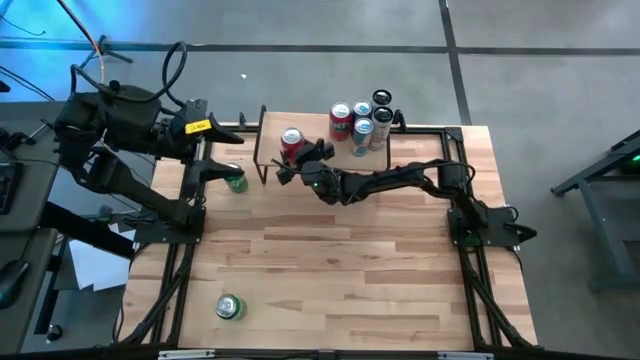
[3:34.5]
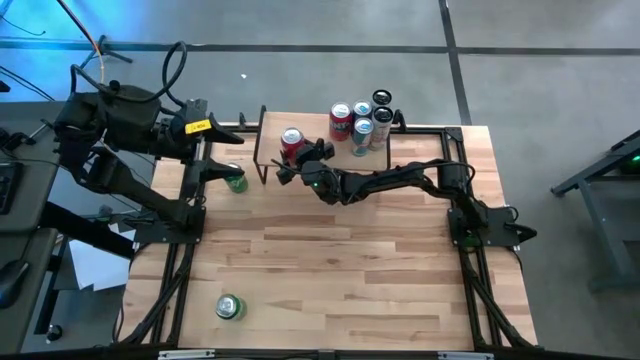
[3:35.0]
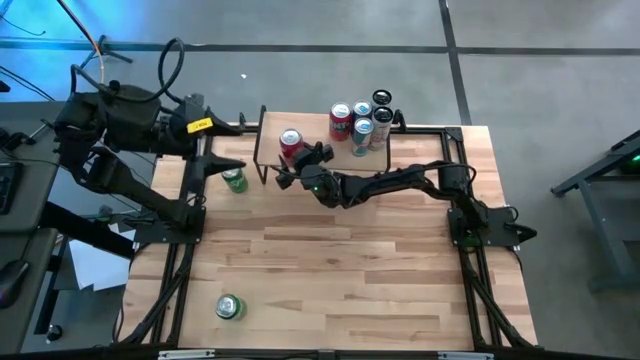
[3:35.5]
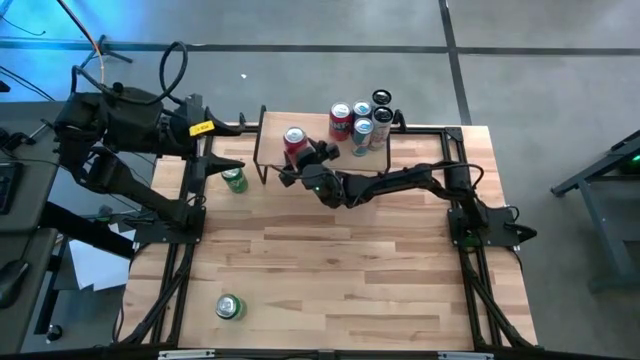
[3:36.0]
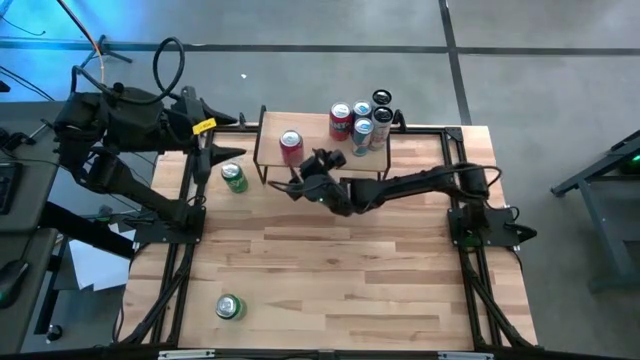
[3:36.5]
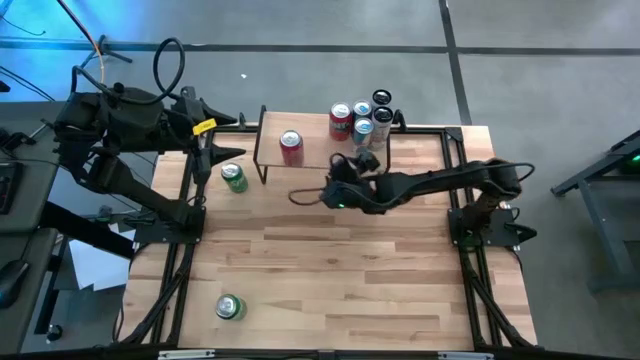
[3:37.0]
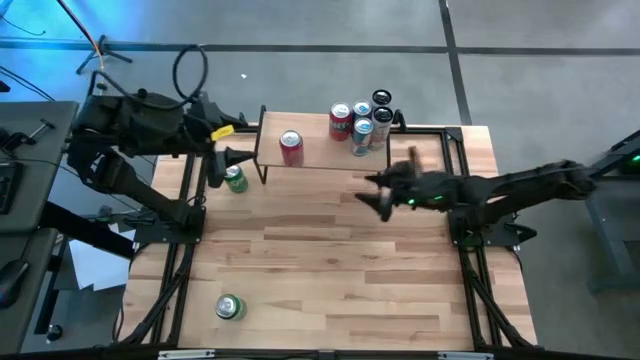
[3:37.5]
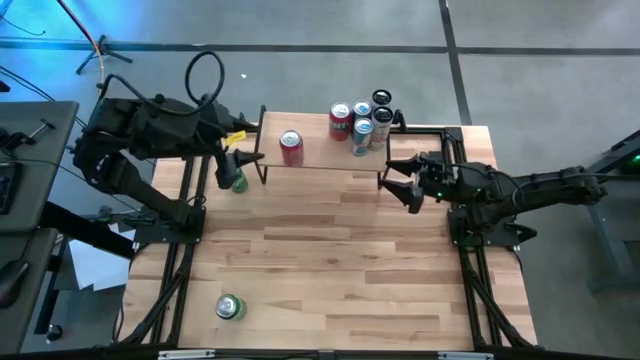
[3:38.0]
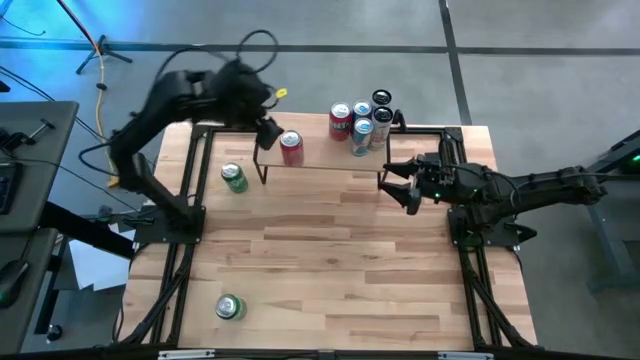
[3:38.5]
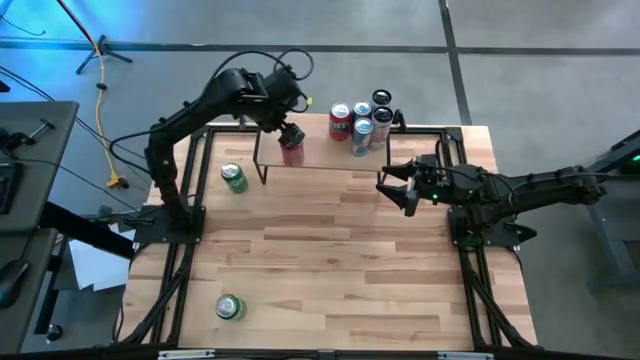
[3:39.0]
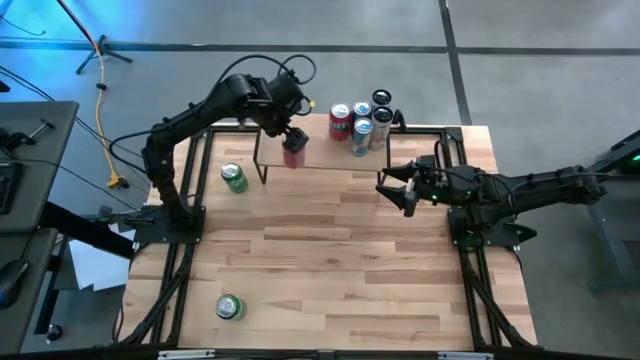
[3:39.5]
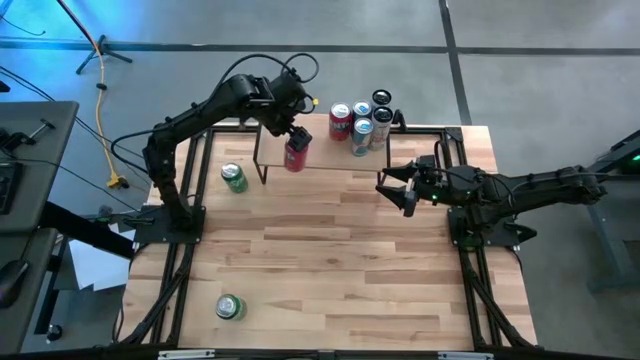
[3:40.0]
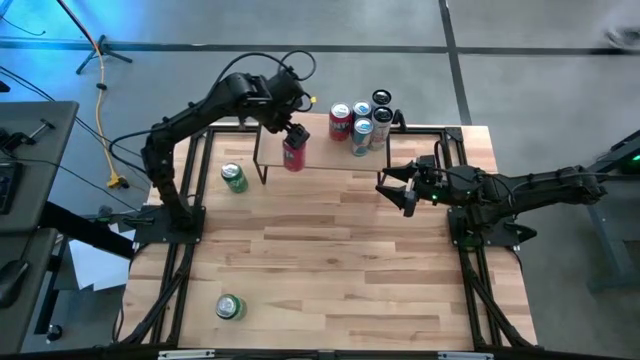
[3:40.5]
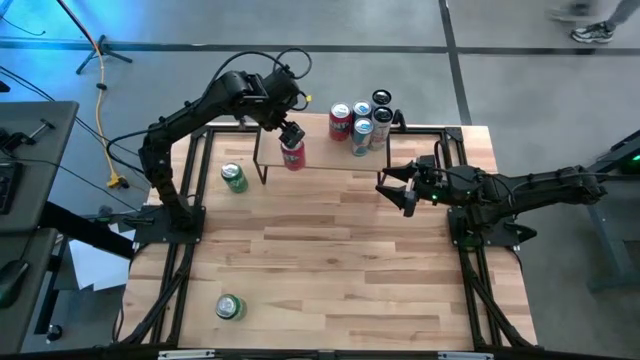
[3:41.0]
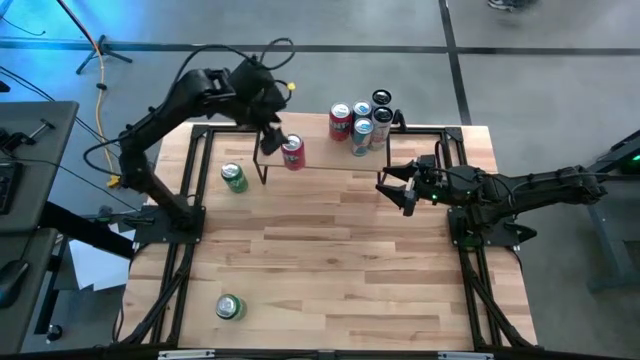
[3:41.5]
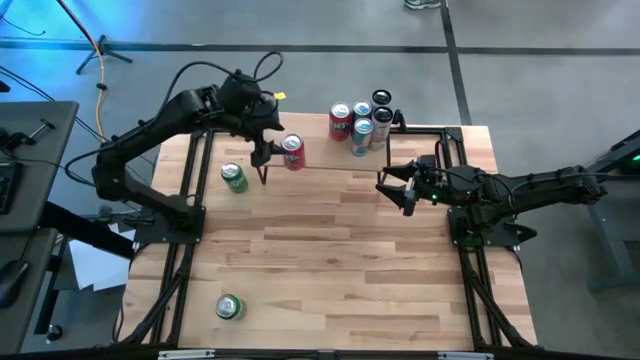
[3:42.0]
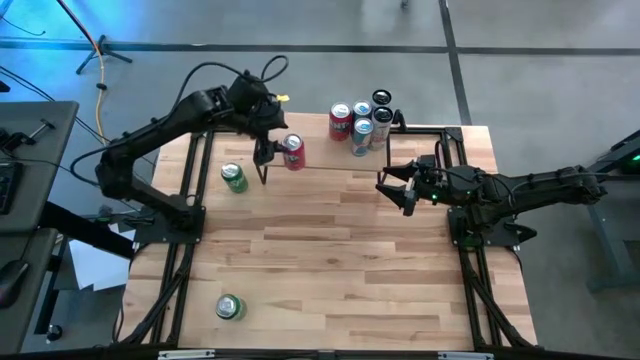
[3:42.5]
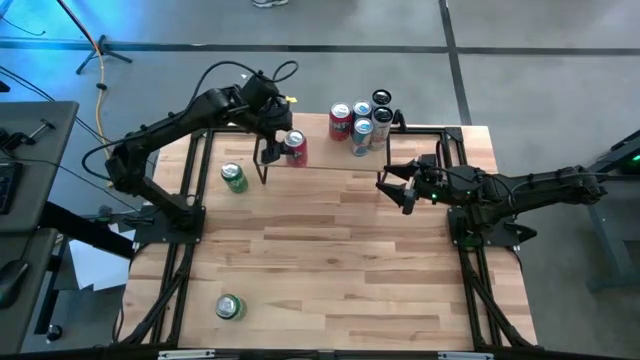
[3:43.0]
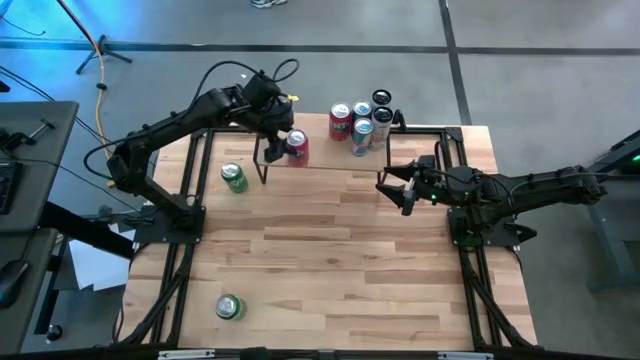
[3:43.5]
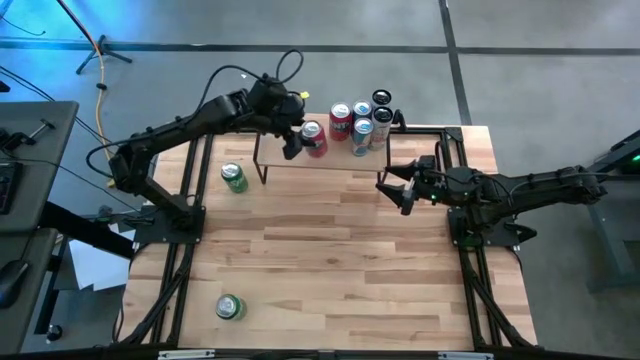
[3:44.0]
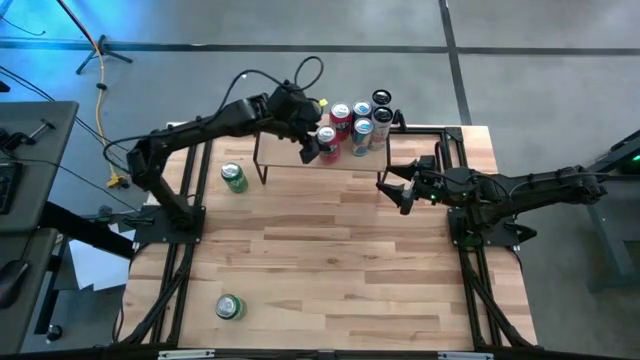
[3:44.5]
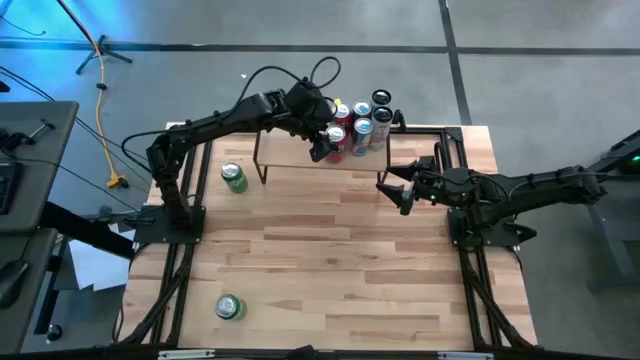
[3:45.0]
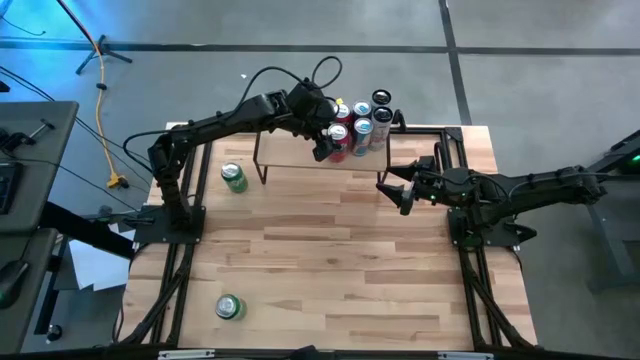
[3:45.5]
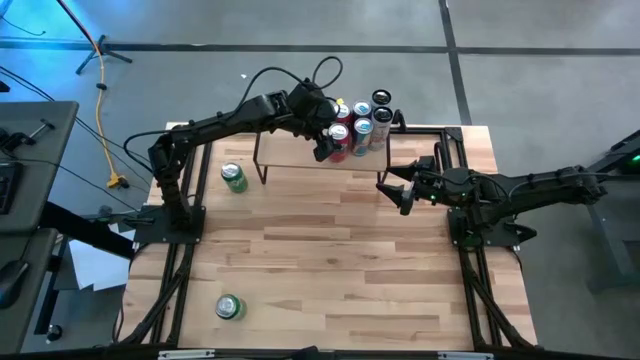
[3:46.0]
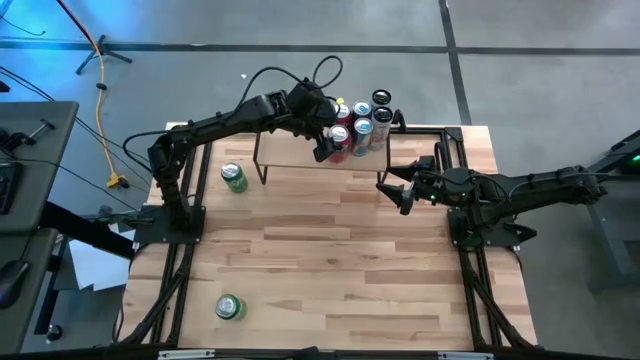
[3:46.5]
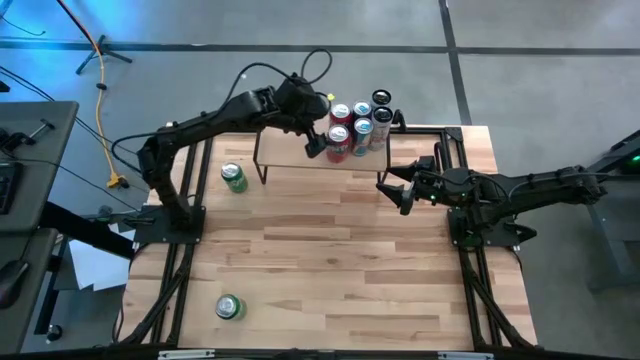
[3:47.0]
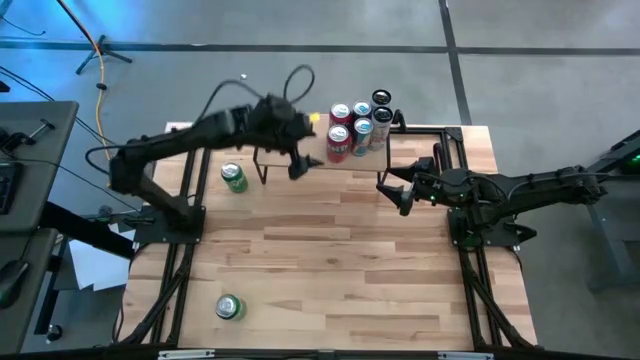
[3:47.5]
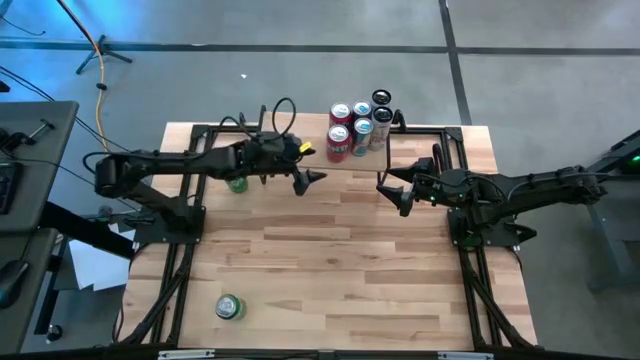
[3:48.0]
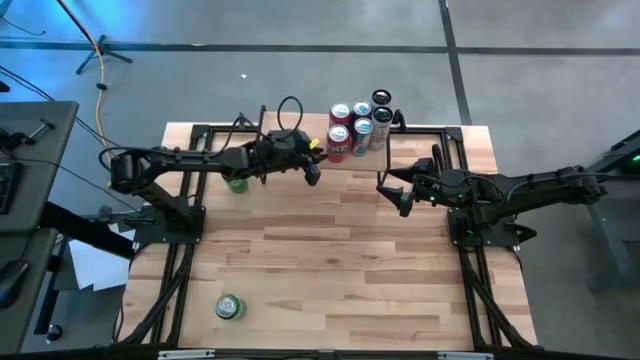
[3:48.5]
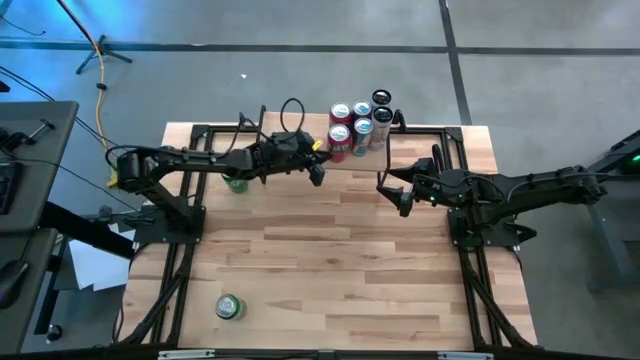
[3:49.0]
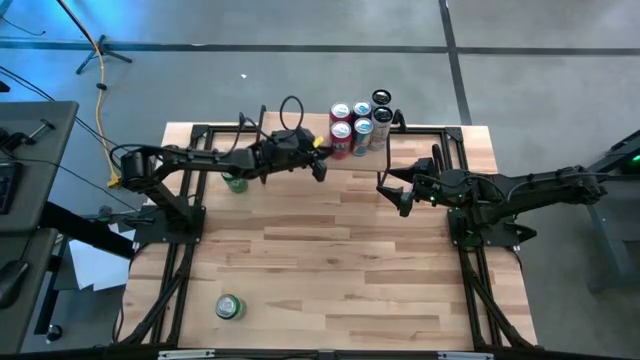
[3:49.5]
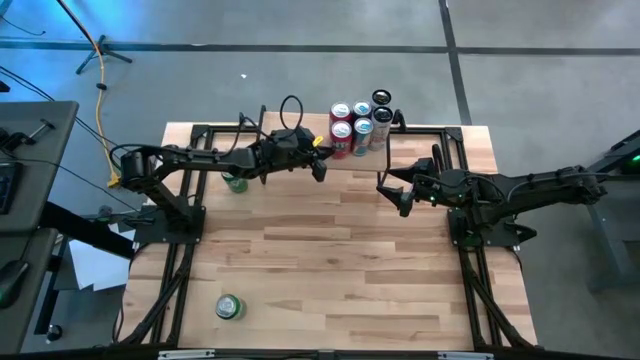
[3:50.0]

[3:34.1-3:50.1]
Task: Place canned beverage on shelf
Put the red soda can on the shelf aligned with the other red soda can
